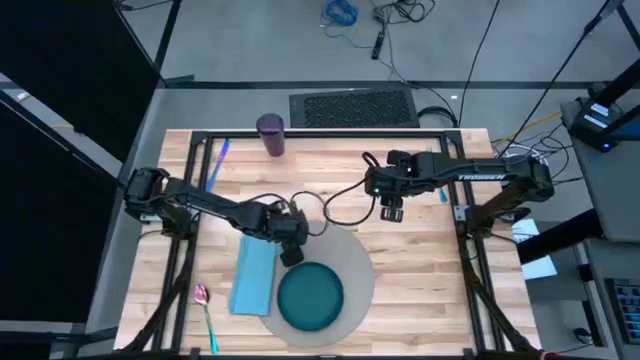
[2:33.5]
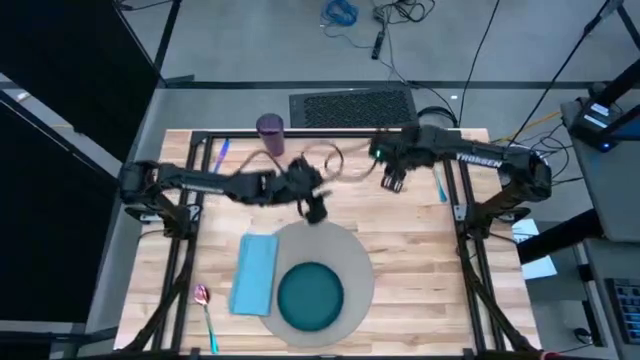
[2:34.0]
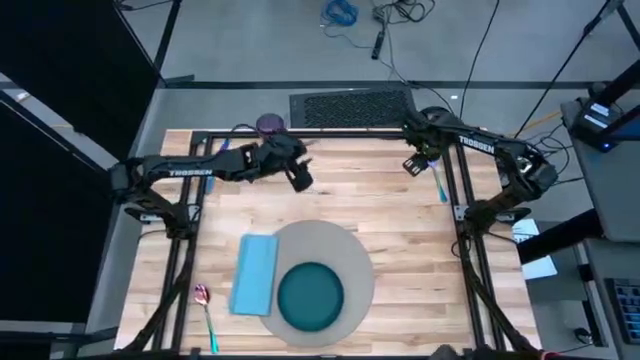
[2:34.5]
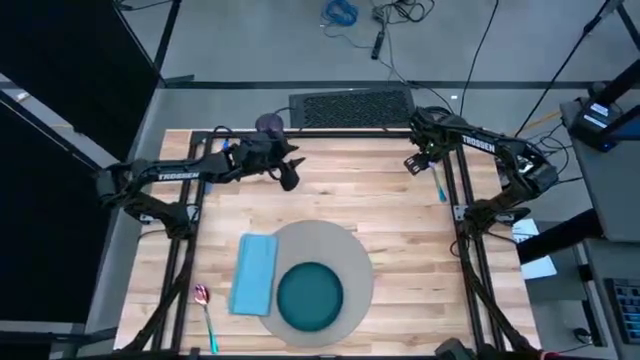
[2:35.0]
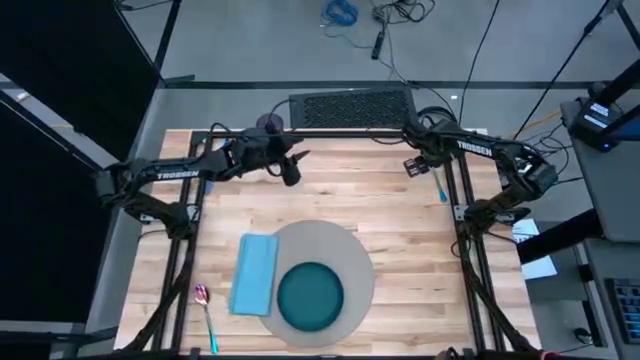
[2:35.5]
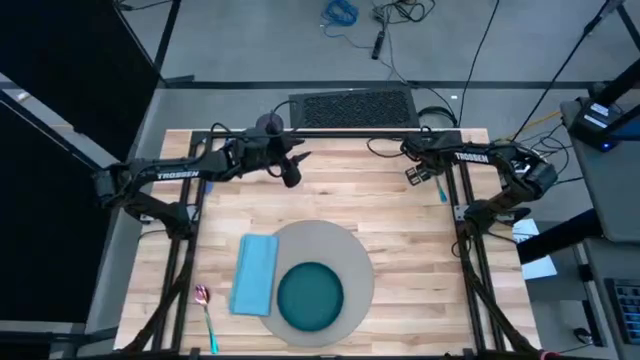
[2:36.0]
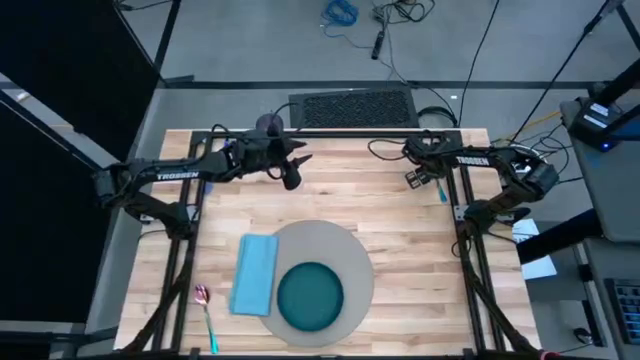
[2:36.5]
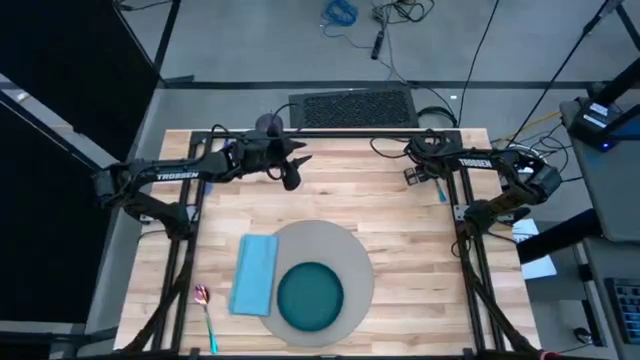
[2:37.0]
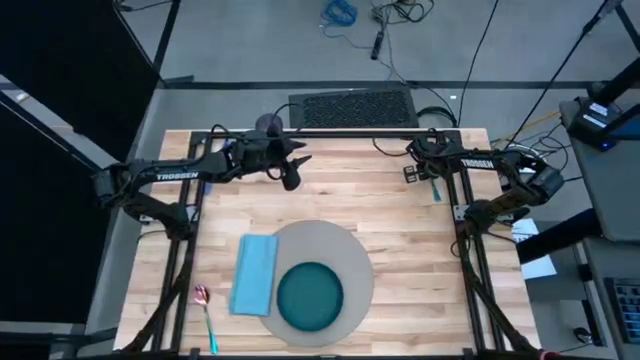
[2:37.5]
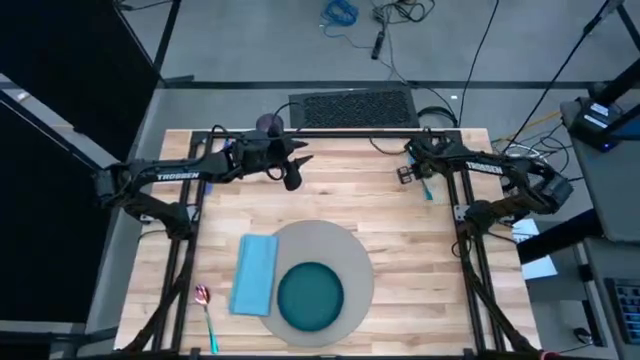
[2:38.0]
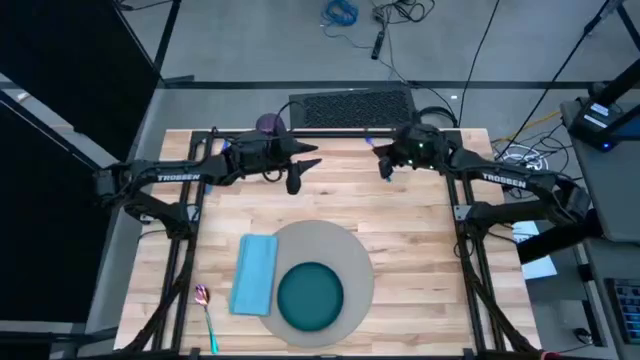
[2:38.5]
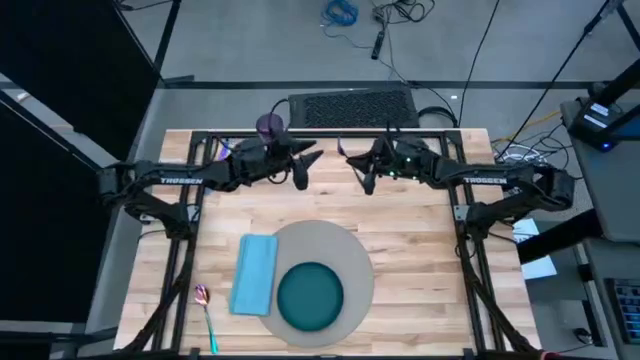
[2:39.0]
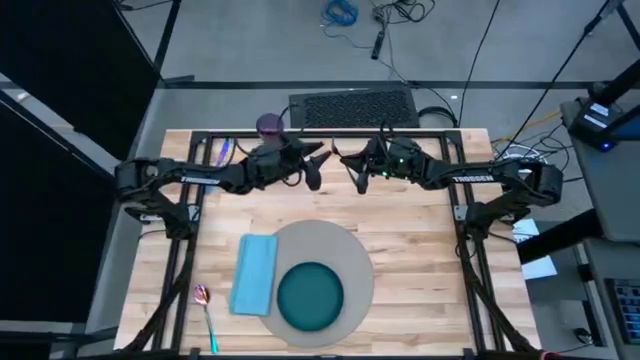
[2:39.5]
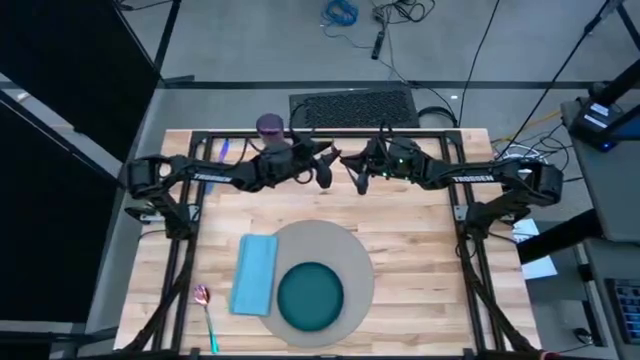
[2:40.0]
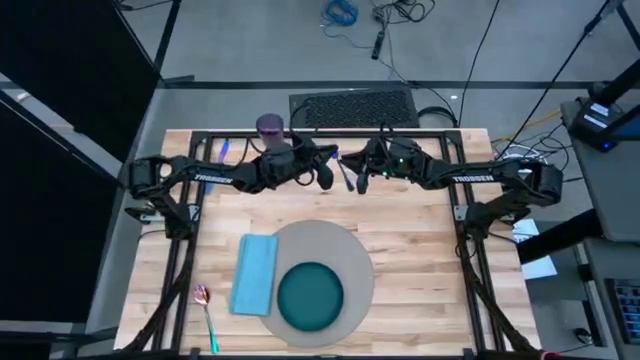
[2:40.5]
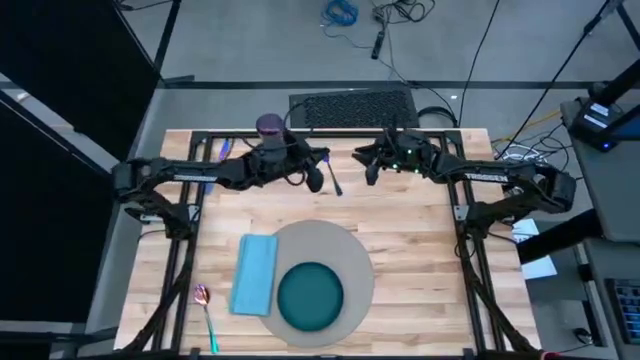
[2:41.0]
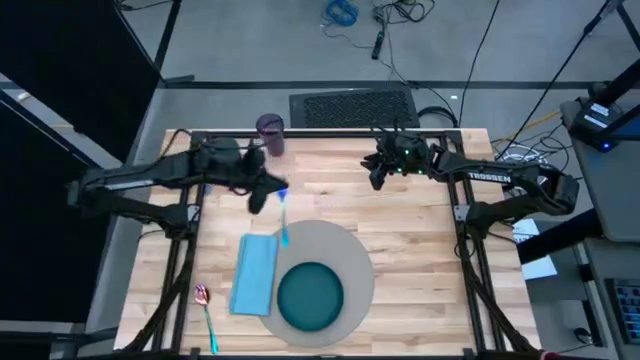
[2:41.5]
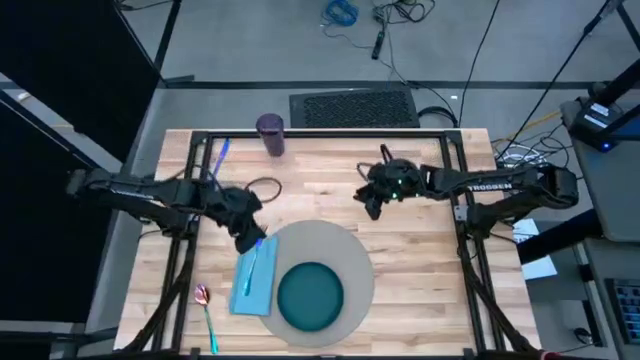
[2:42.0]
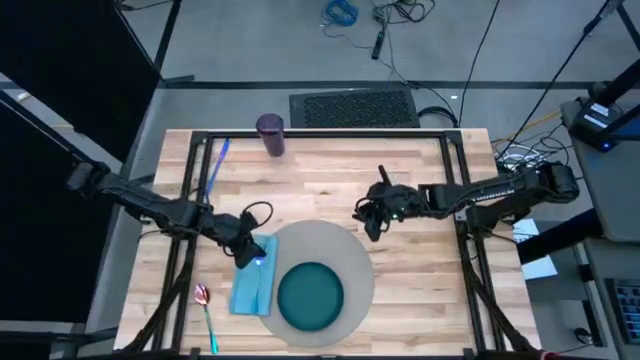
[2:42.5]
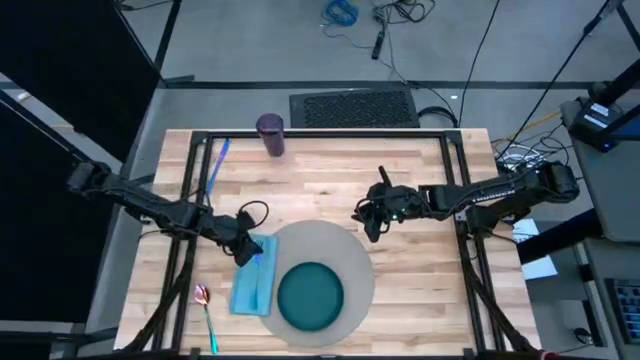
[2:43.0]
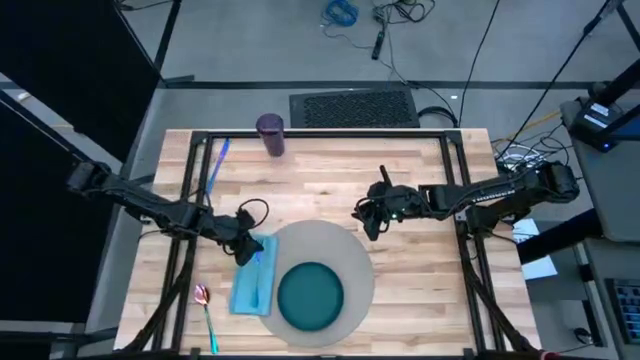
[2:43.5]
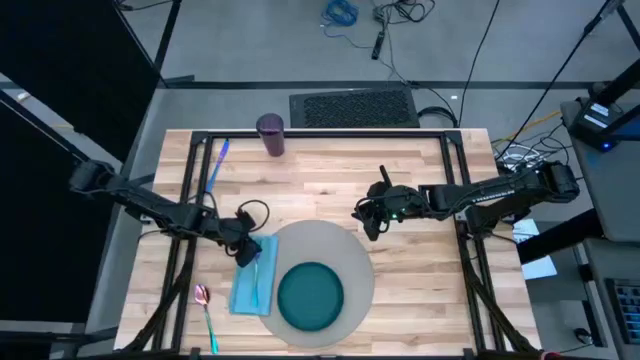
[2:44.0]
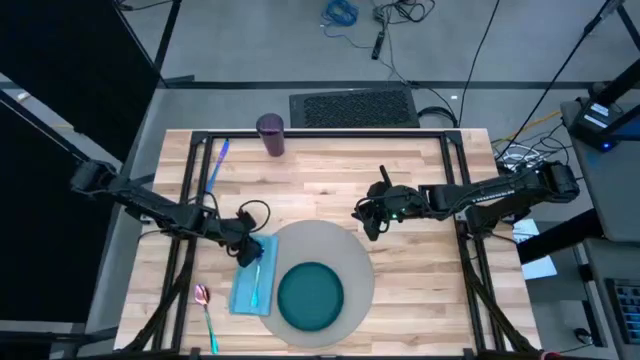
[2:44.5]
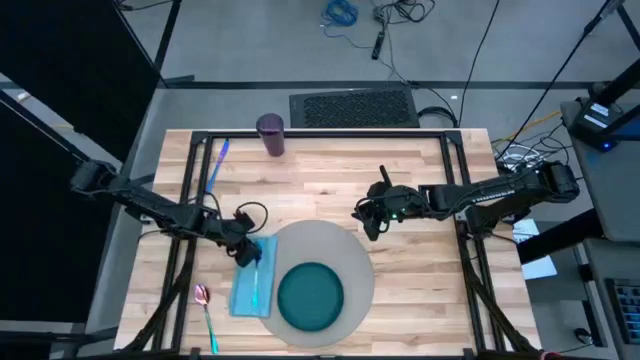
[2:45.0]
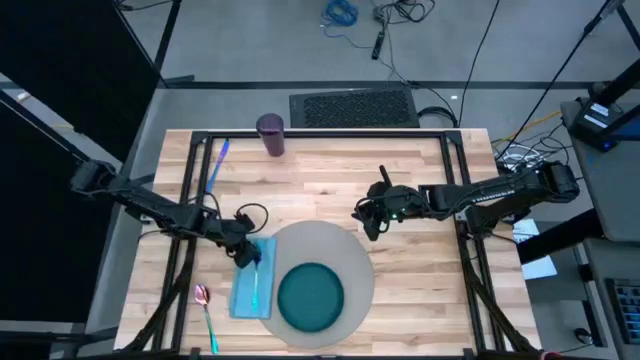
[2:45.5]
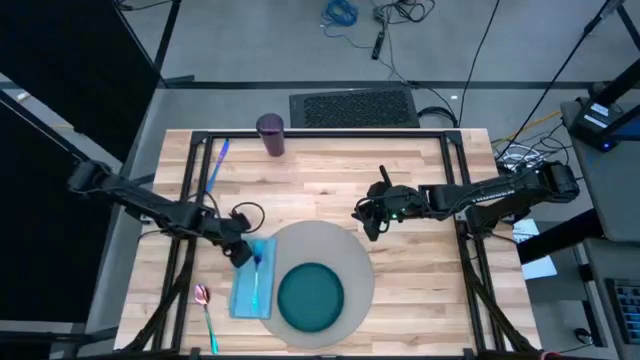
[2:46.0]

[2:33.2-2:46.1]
Task: Set table place
Put the blue fork on the blue table napkin

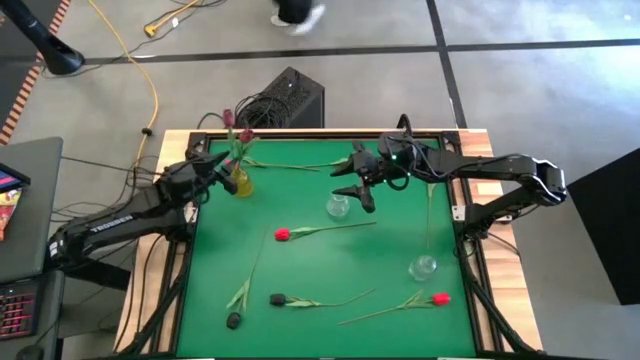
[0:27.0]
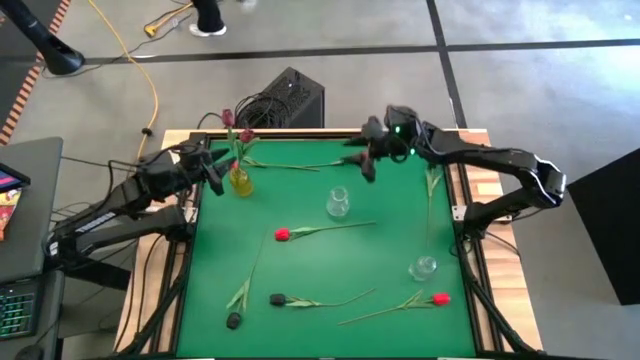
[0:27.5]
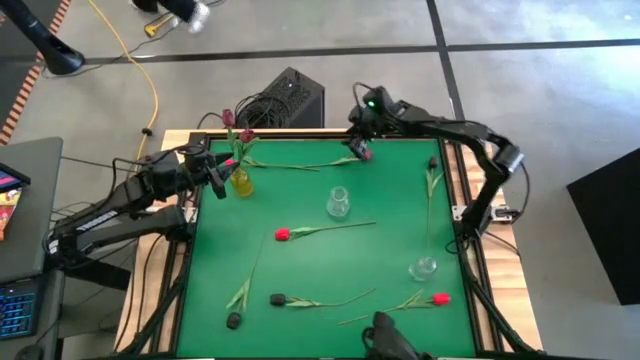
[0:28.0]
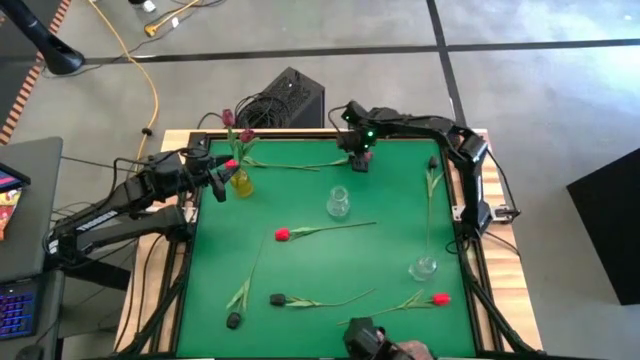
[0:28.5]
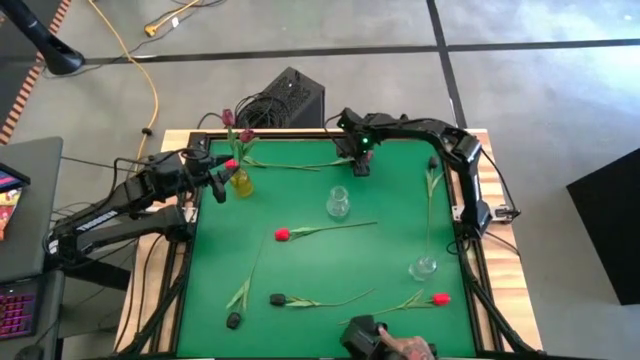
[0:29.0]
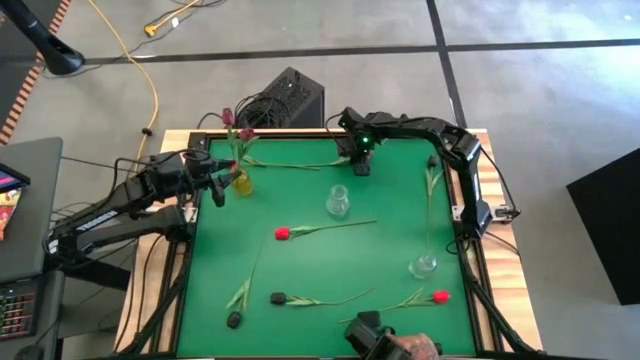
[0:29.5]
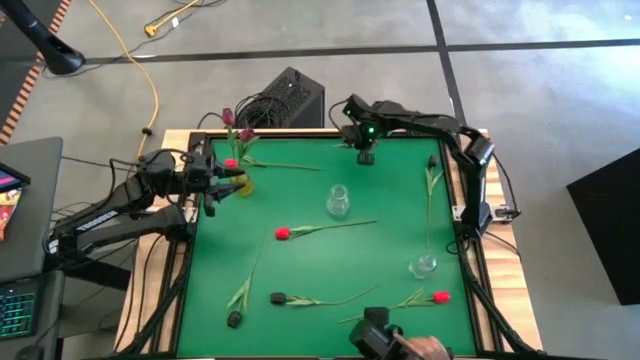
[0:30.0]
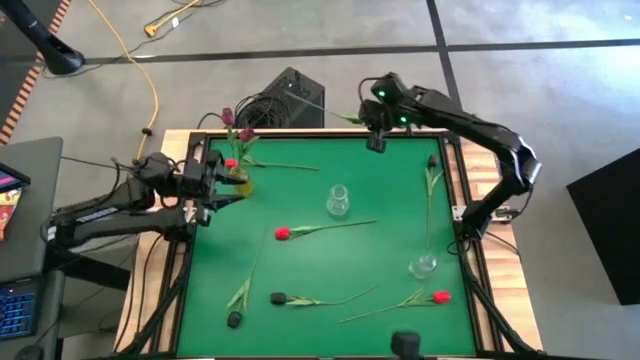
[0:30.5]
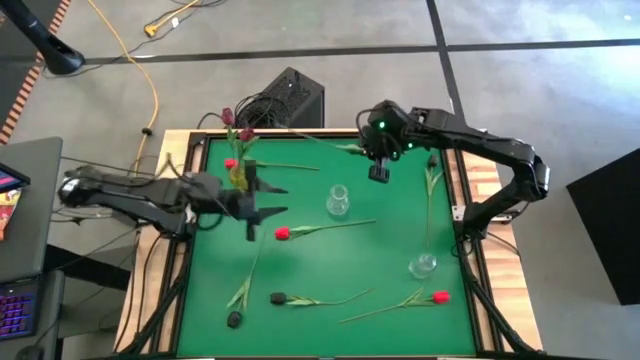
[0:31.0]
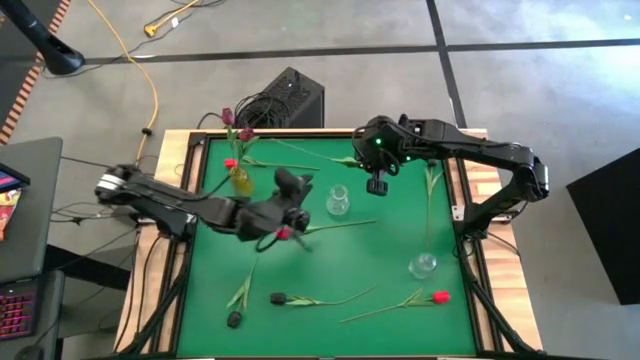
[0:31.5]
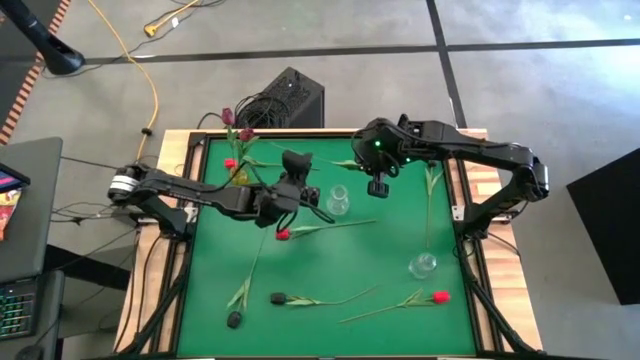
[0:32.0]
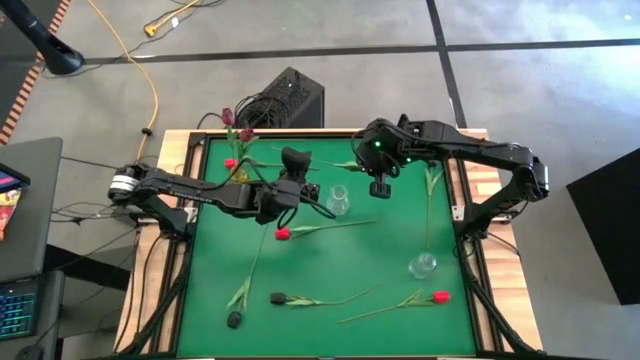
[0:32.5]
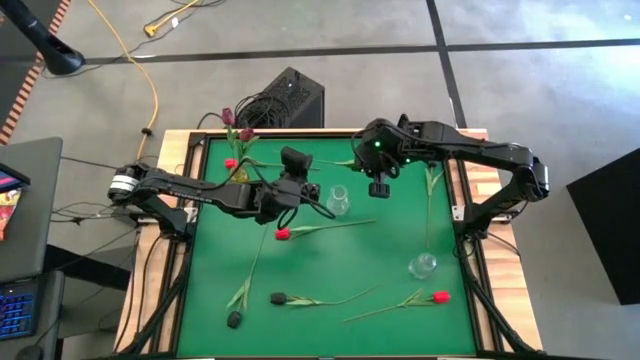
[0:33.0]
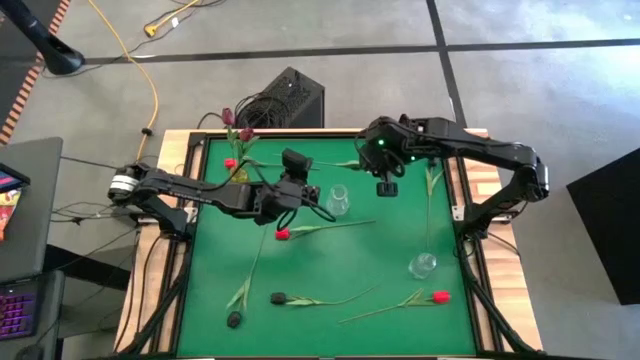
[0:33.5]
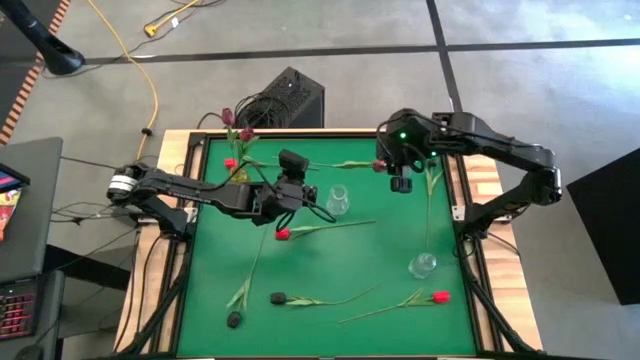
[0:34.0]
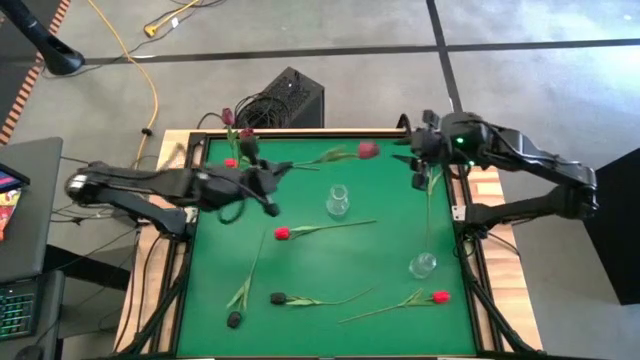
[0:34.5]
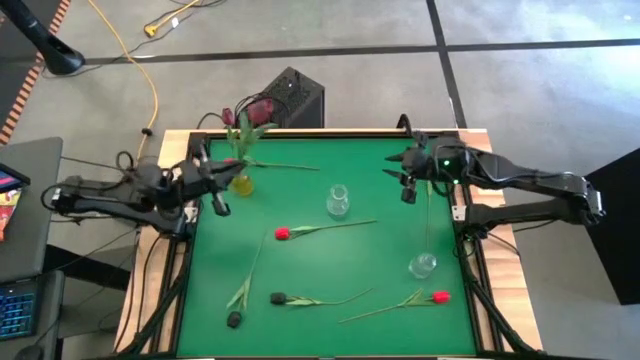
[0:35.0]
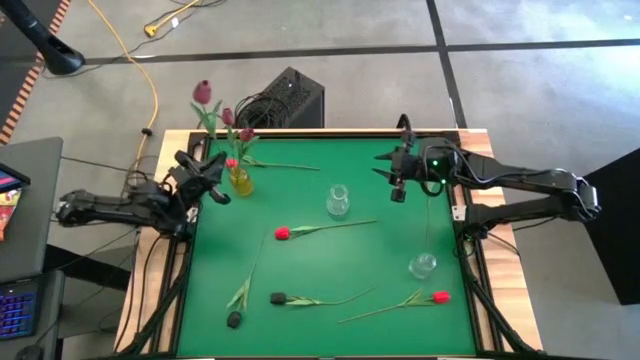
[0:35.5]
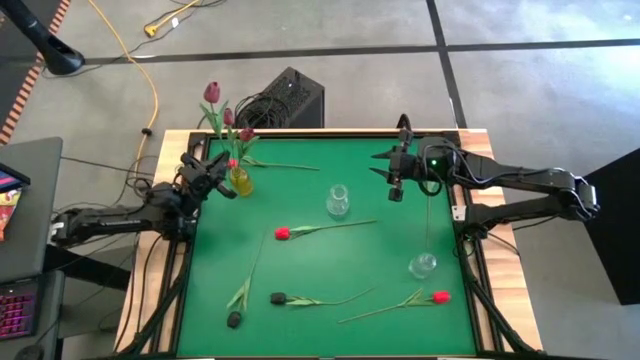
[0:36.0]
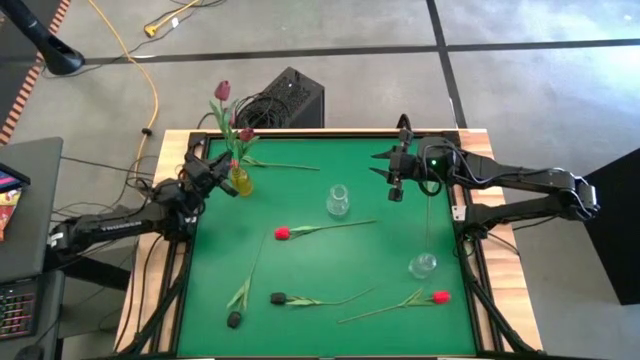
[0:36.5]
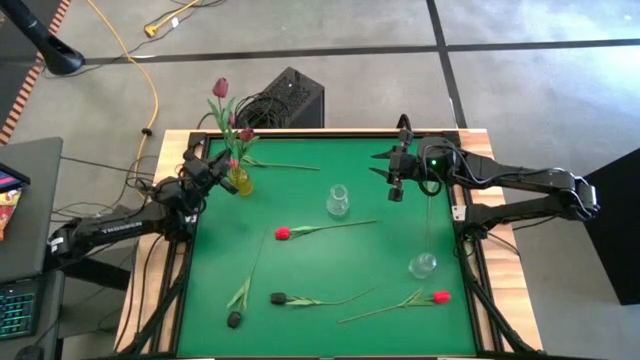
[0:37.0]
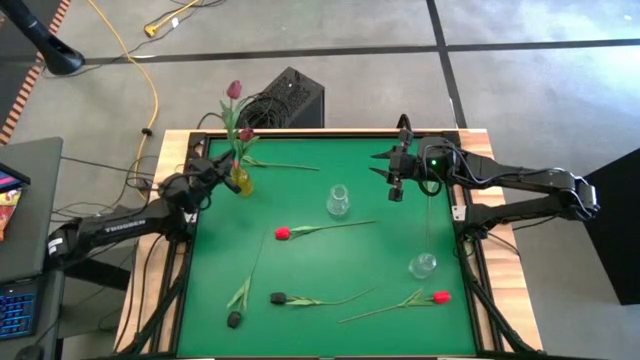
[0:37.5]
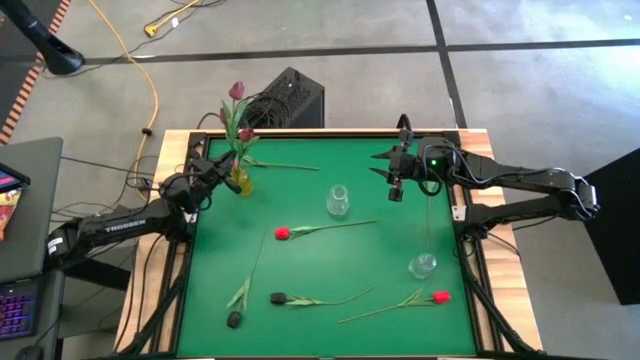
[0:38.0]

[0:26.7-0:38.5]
Task: Sort flowers into vase by color
Put the dark red flower into the yellow vase
